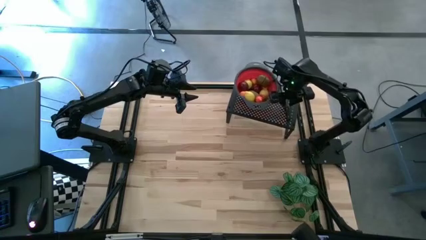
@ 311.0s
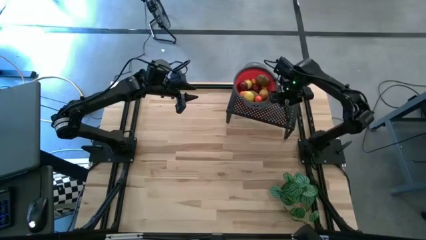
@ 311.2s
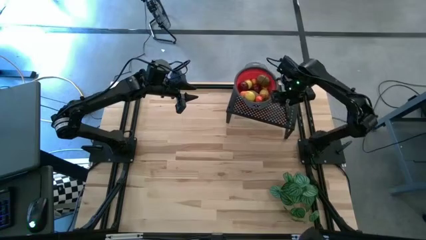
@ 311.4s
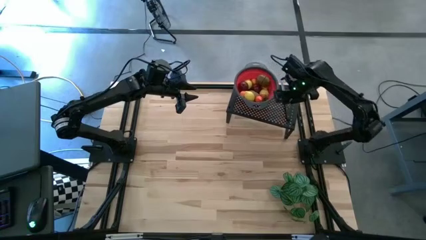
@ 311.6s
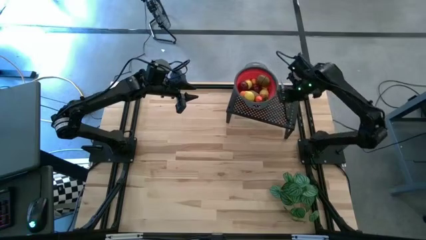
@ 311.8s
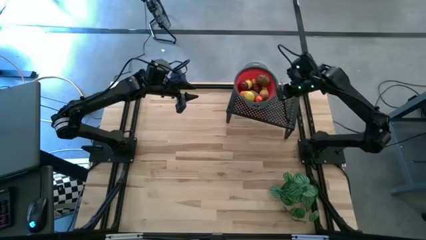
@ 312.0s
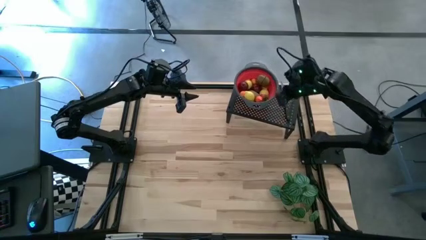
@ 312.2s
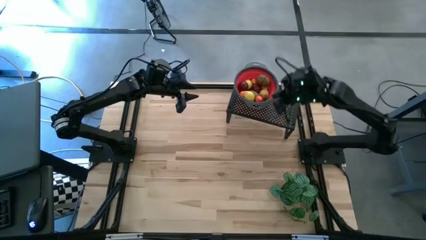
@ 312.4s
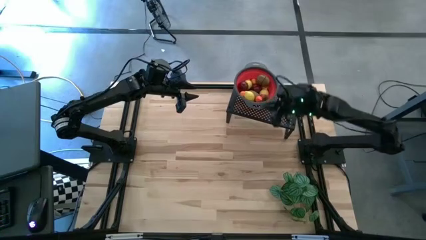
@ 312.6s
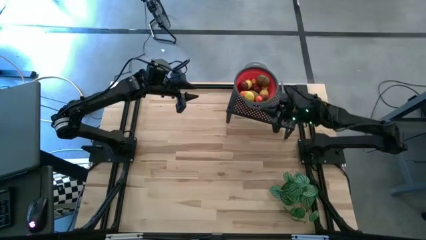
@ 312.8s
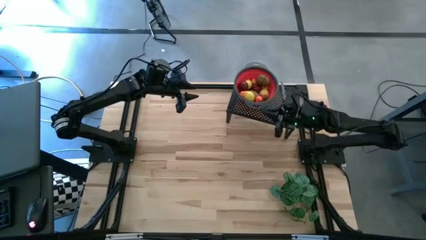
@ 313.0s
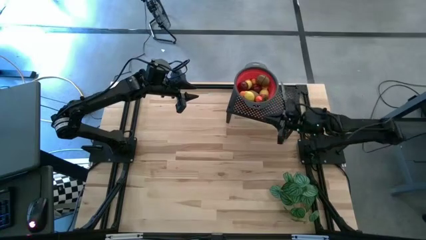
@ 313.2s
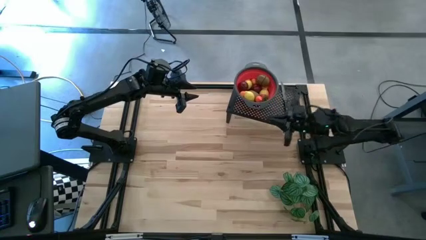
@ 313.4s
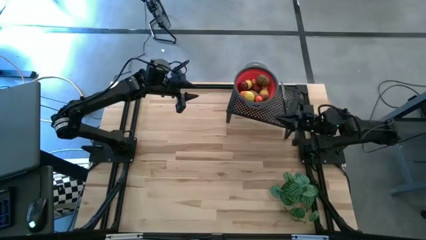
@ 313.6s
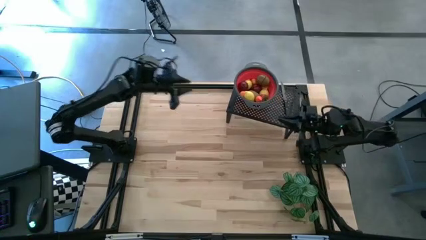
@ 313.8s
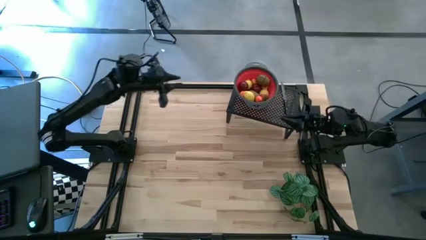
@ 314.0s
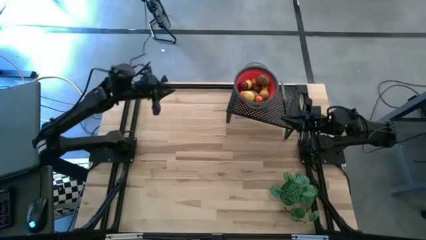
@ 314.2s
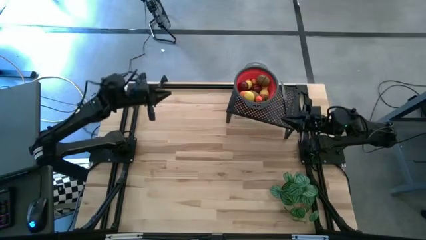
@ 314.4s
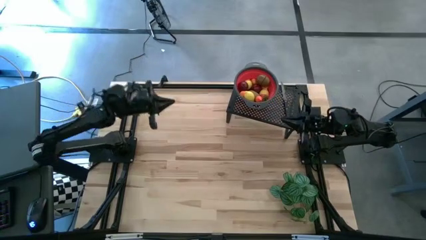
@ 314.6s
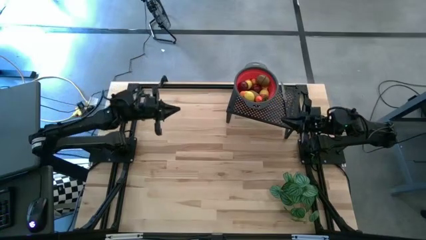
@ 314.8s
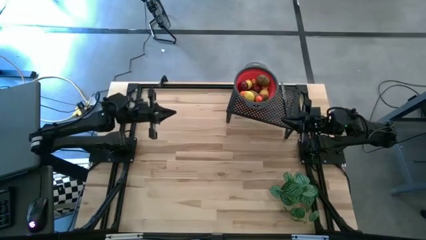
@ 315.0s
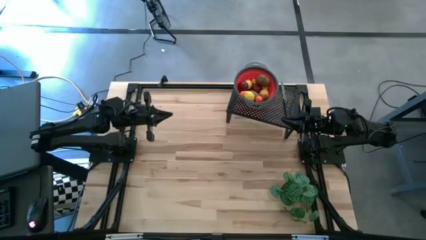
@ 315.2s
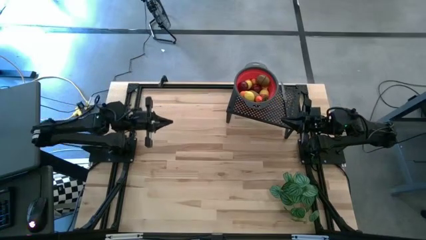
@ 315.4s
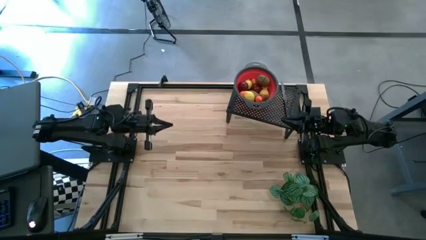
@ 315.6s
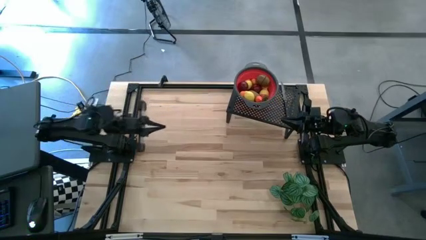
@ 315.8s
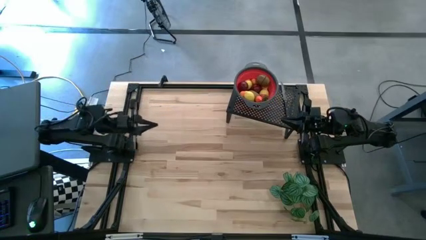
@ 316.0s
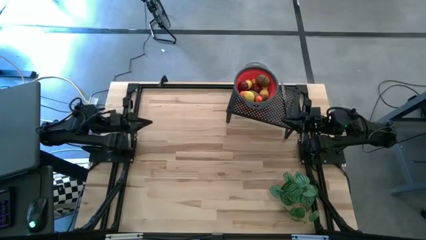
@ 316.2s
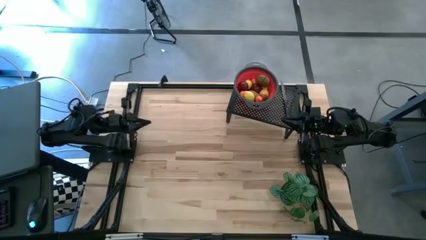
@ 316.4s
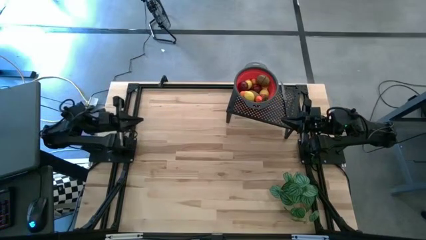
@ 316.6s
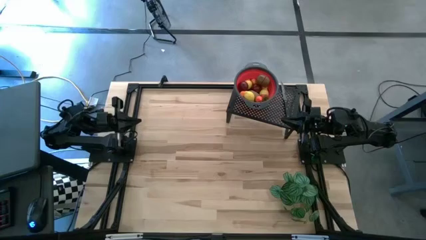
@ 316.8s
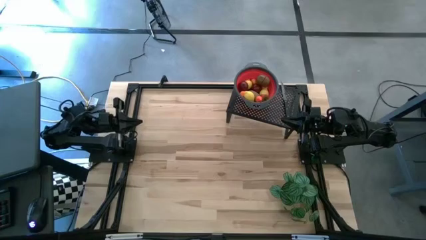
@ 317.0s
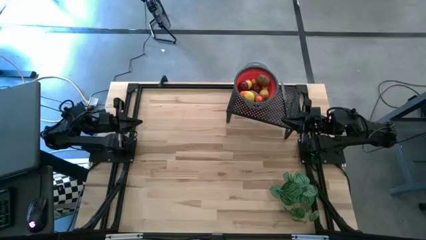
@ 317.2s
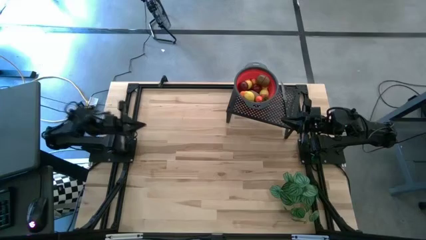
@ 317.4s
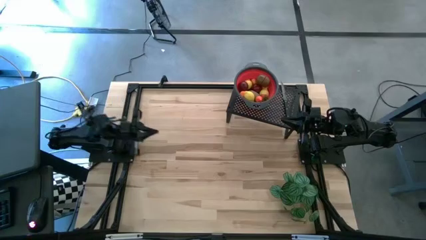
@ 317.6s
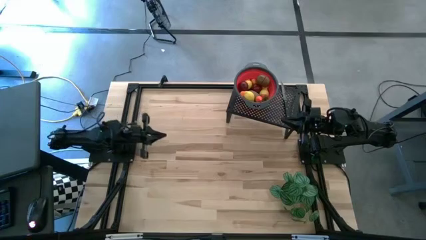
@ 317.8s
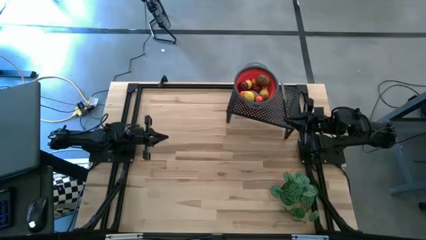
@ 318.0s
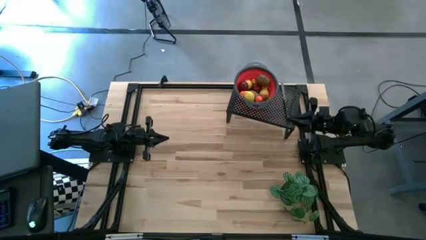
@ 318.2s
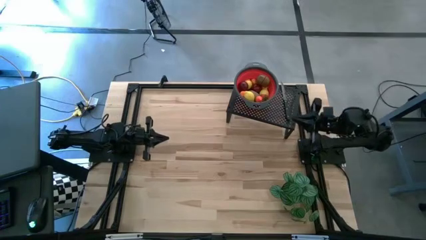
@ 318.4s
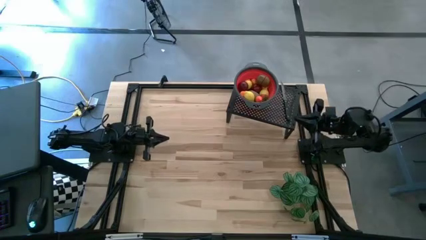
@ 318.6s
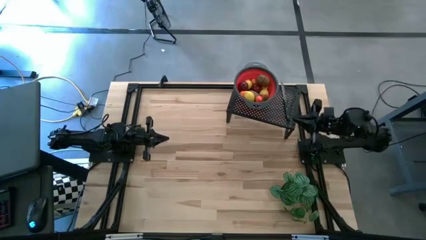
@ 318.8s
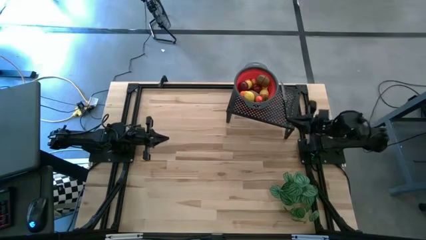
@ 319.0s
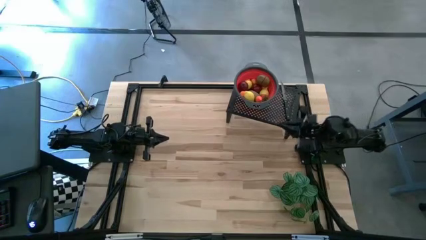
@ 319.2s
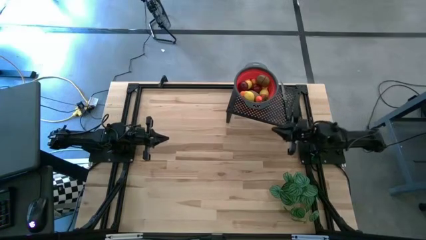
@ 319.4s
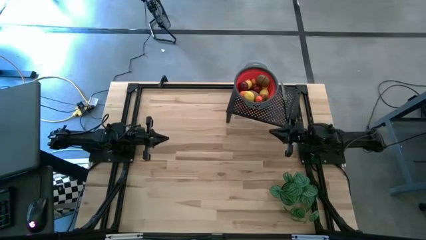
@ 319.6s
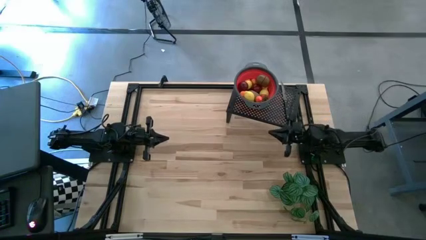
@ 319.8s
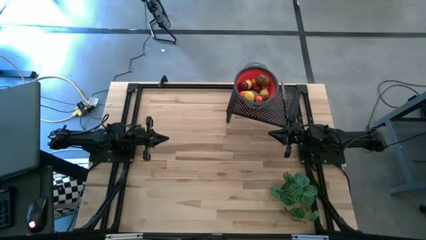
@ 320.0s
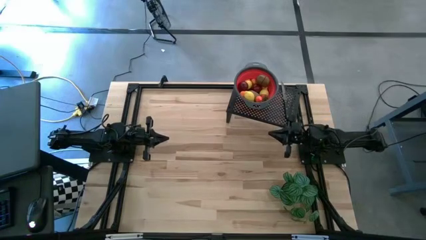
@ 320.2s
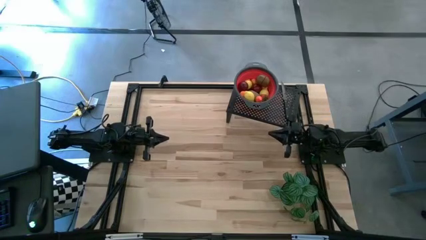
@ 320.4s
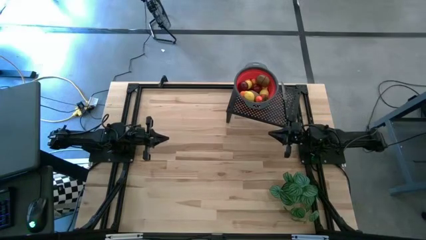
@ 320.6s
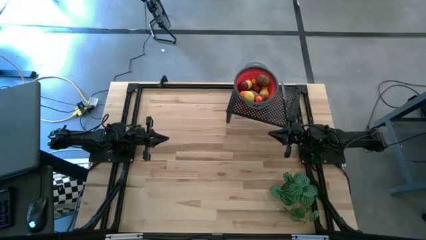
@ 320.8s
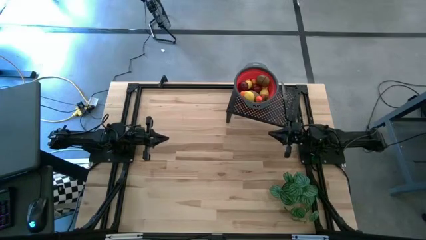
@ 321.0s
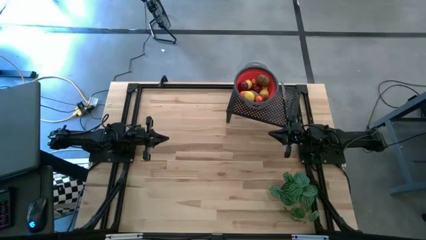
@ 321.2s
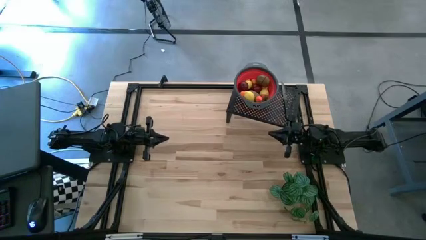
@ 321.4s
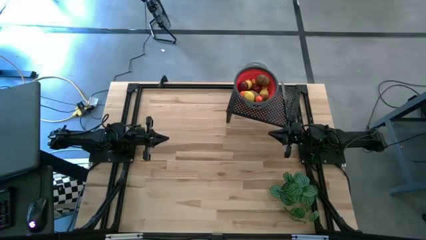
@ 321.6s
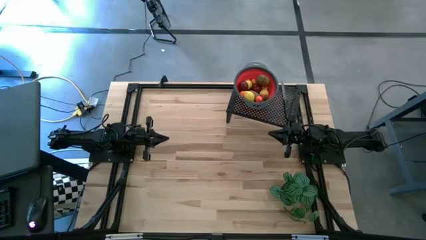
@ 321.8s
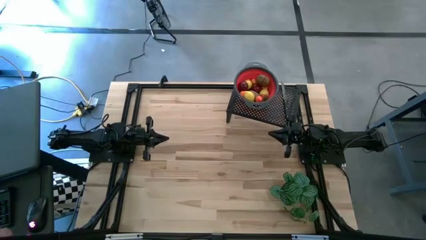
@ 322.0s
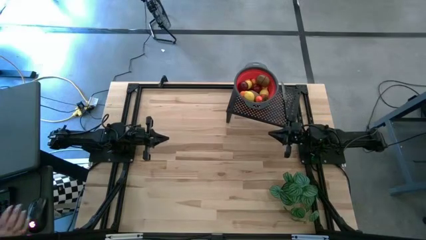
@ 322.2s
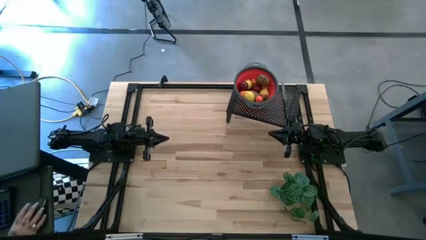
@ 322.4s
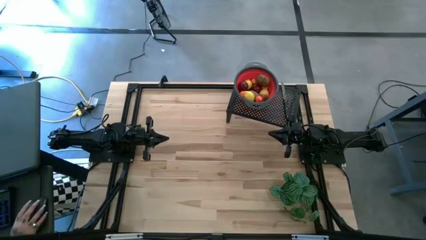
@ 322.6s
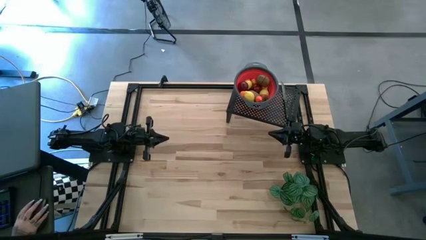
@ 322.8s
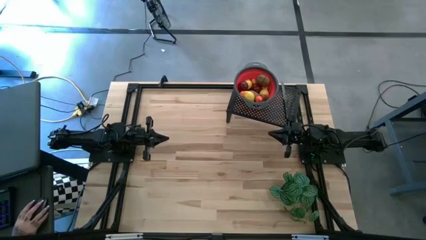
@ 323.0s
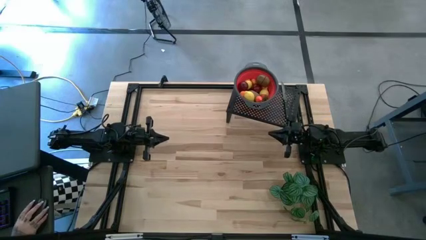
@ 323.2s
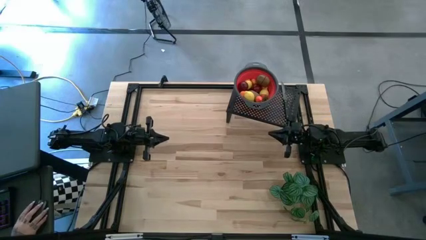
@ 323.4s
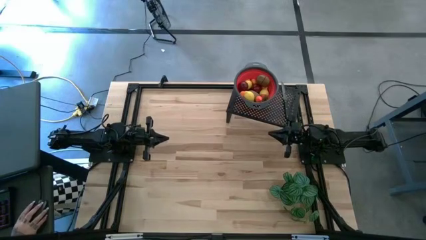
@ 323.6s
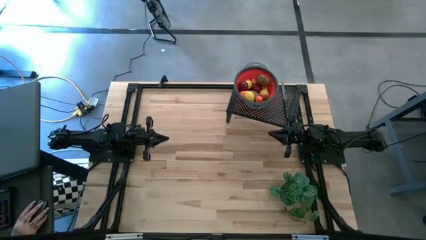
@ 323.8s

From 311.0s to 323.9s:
Task: Pick & Place Fruit
Return to Home Position

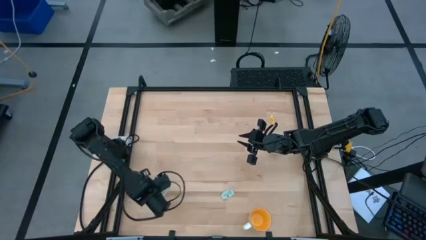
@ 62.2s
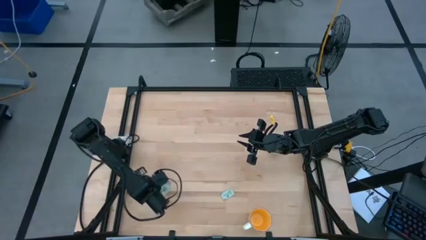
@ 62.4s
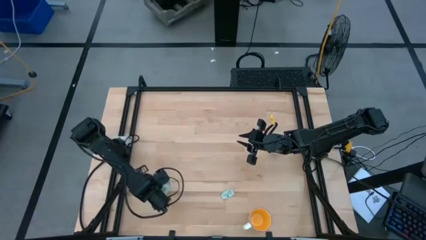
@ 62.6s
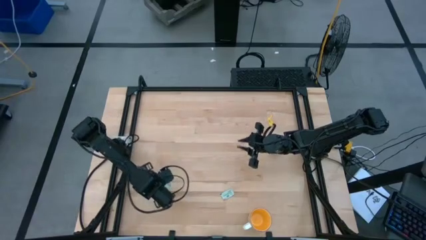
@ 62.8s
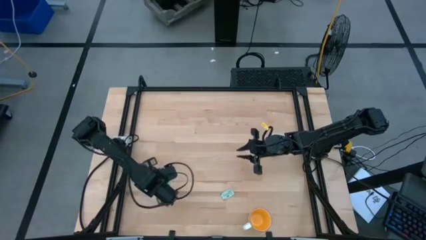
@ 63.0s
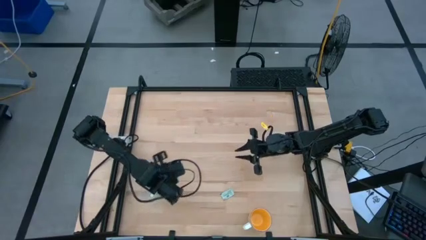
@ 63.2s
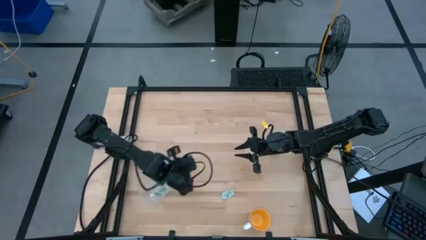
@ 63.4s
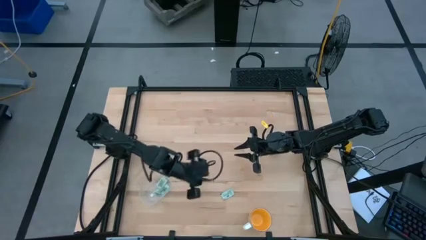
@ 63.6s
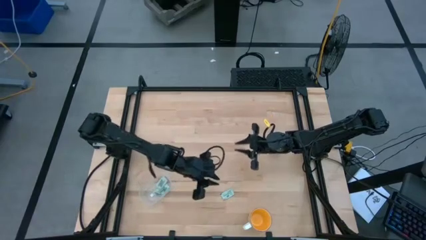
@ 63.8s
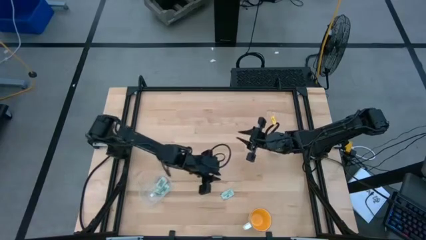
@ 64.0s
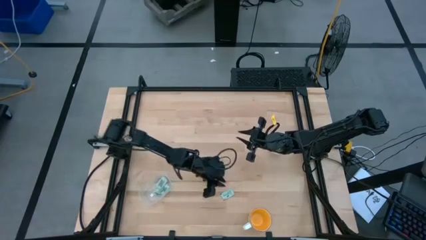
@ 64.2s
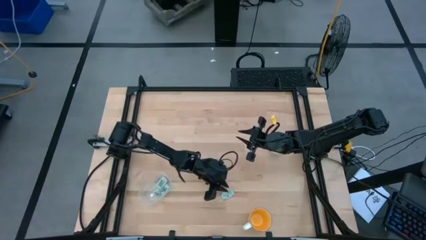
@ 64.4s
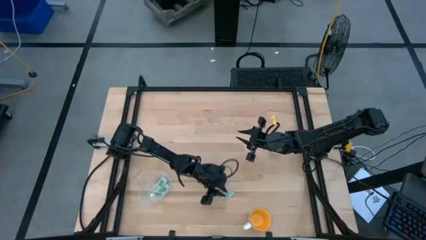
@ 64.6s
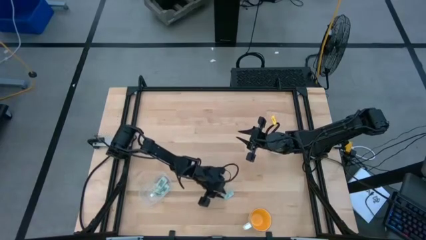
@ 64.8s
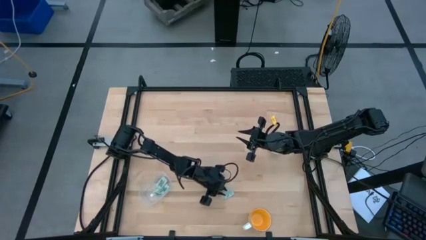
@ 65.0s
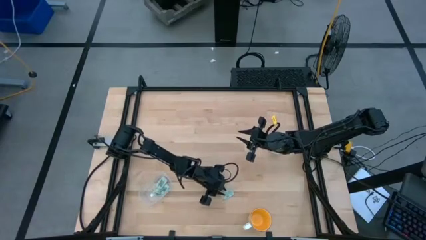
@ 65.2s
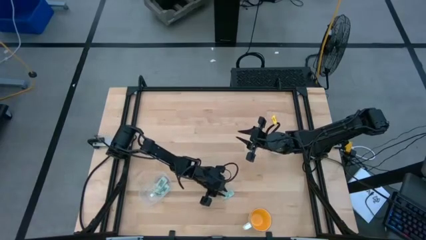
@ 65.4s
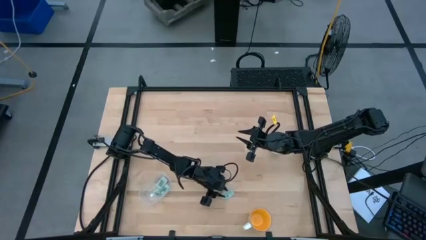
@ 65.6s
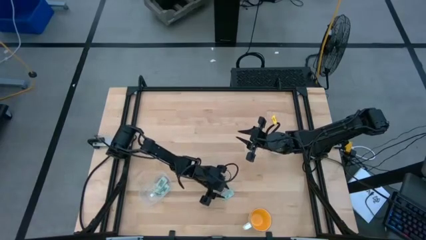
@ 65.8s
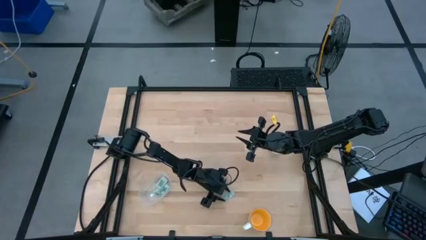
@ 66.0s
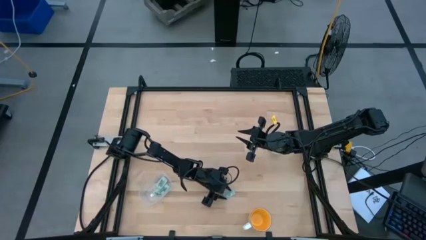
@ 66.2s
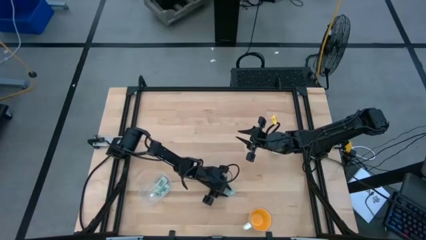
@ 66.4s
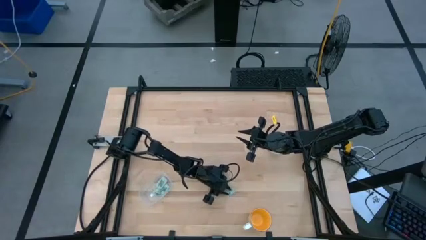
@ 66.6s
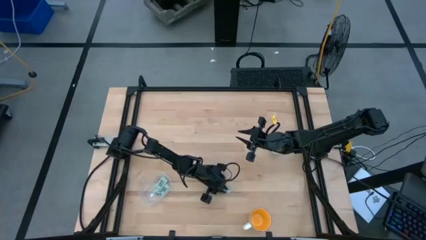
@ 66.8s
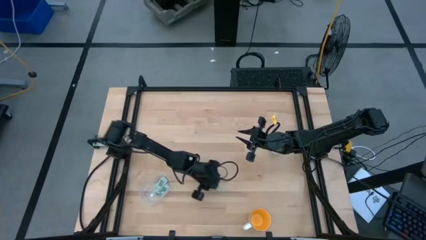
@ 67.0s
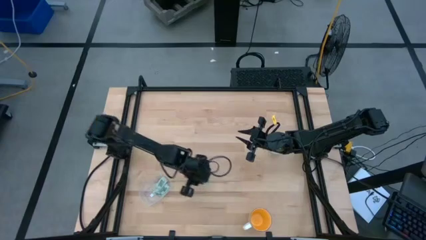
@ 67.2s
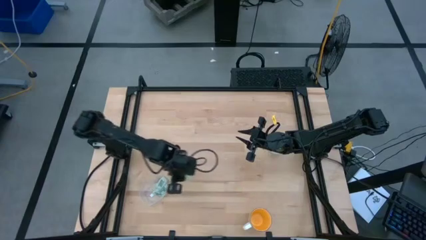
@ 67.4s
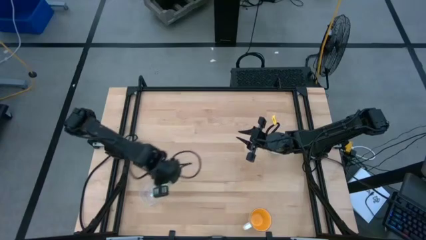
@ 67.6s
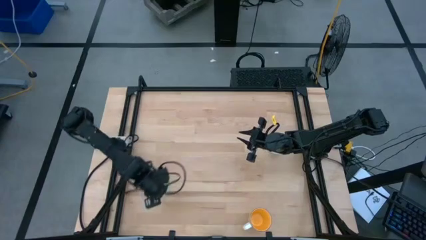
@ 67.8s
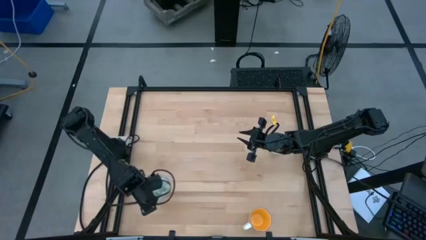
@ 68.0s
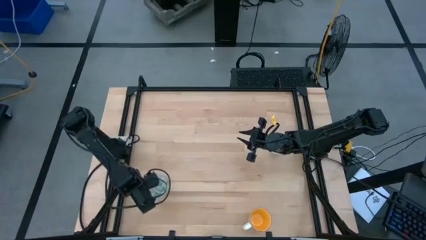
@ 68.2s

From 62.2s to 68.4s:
Task: Pick and place Stevia / Truvia into bins
Put the white stevia packet into the rectangle transparent container
